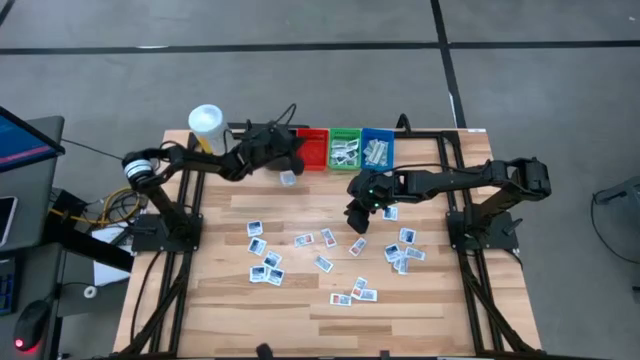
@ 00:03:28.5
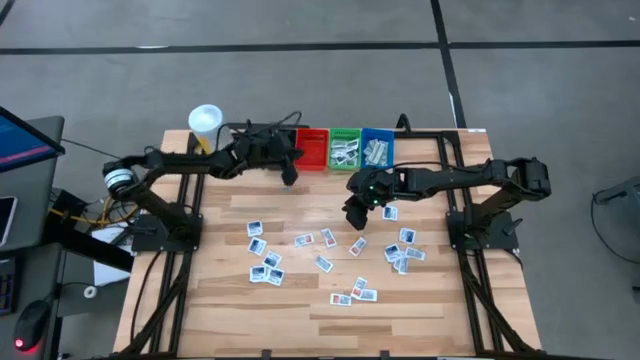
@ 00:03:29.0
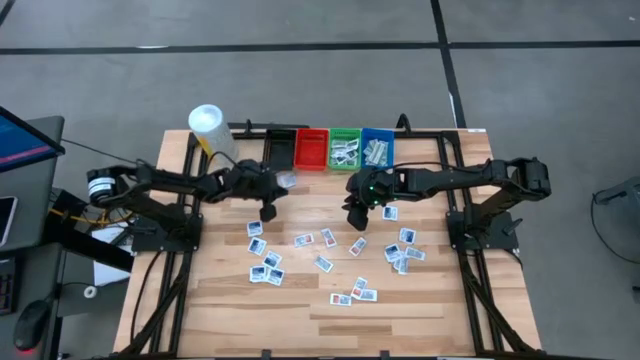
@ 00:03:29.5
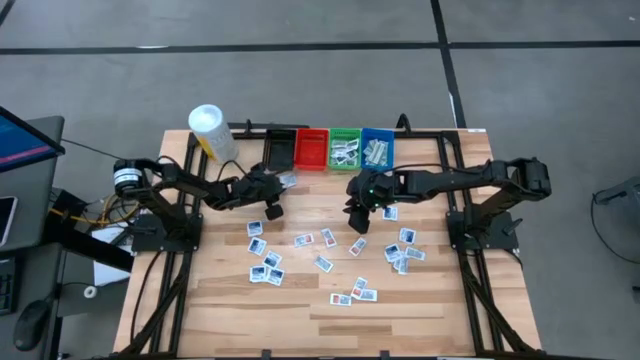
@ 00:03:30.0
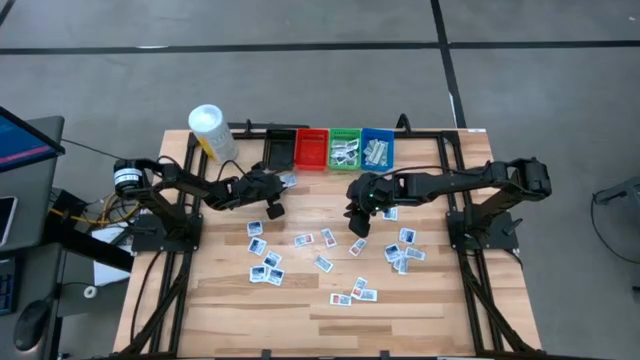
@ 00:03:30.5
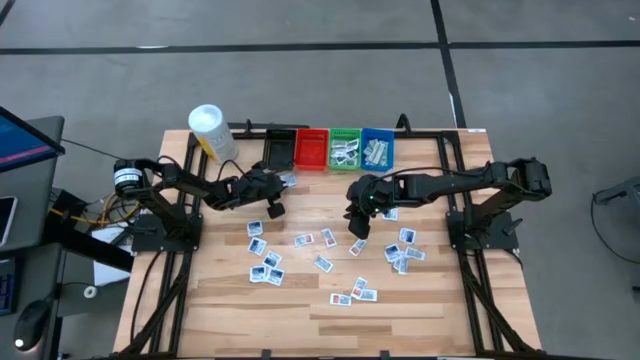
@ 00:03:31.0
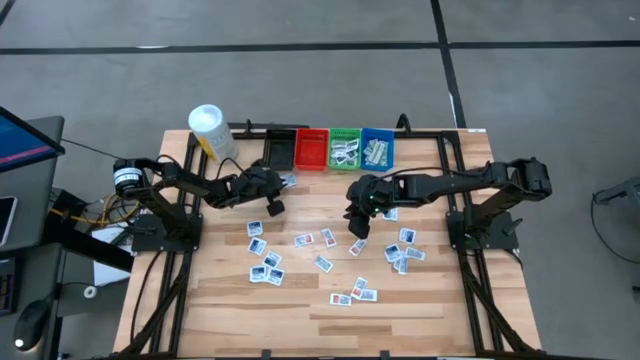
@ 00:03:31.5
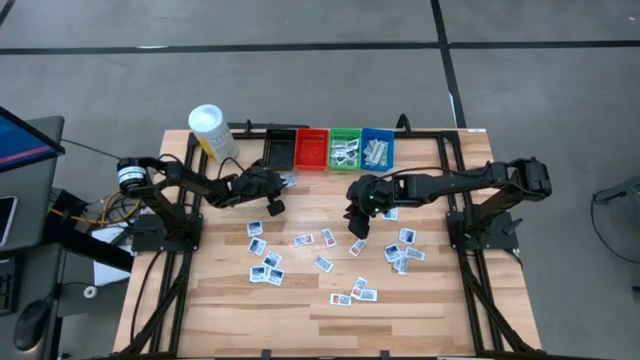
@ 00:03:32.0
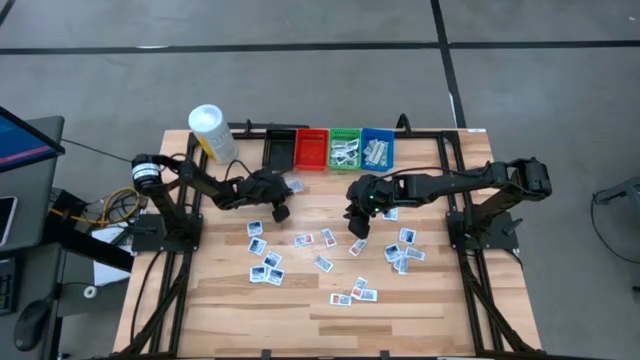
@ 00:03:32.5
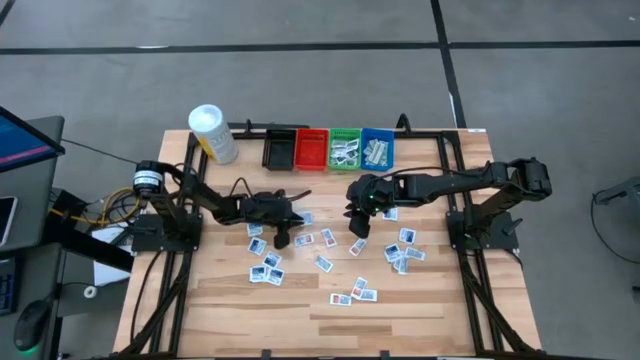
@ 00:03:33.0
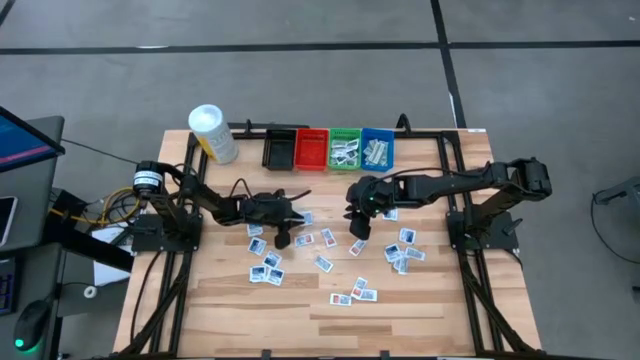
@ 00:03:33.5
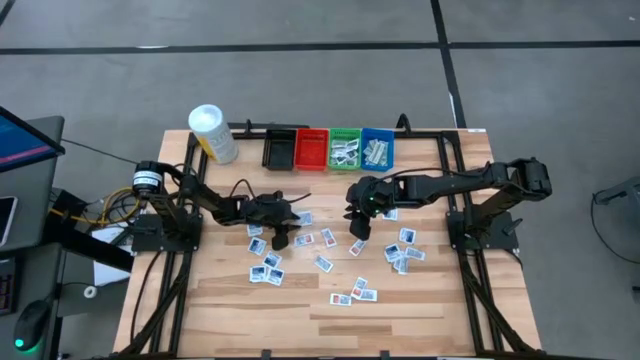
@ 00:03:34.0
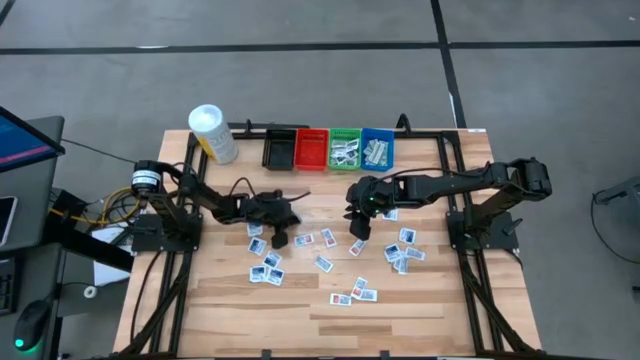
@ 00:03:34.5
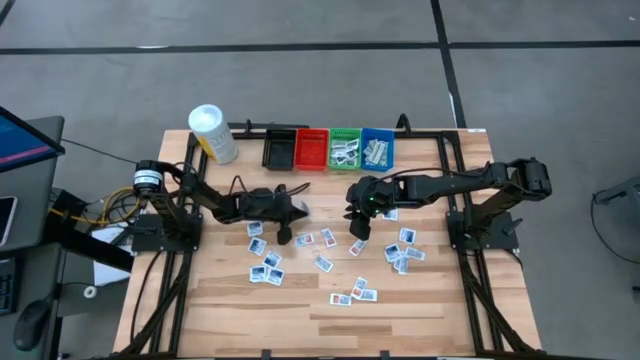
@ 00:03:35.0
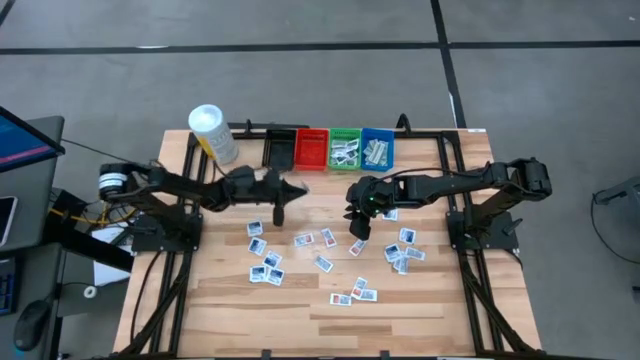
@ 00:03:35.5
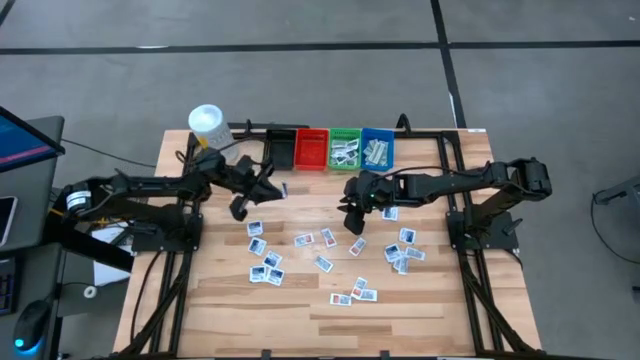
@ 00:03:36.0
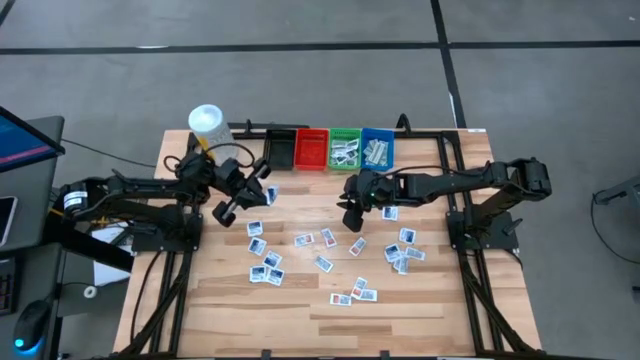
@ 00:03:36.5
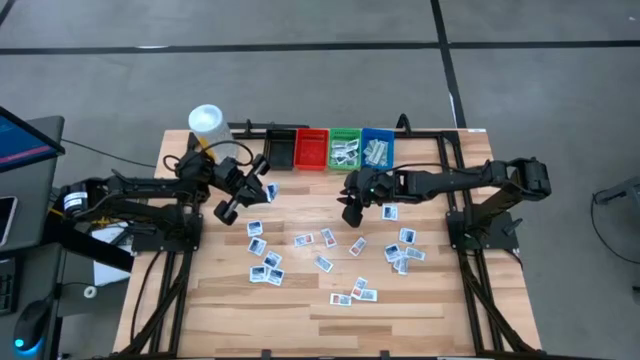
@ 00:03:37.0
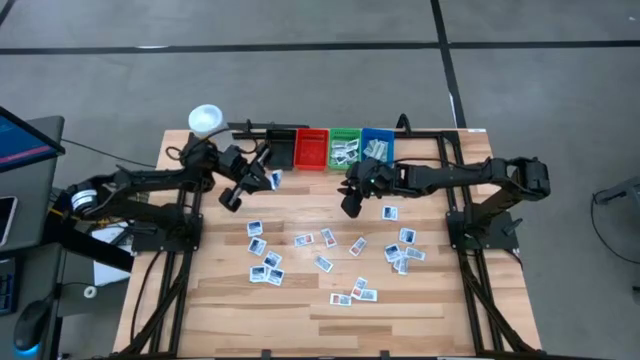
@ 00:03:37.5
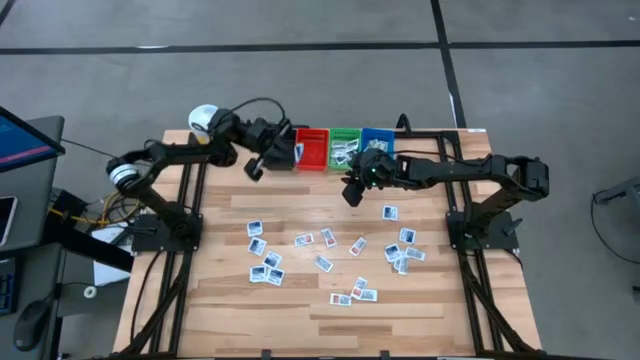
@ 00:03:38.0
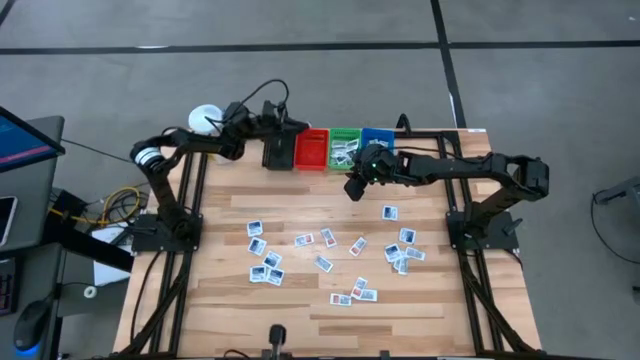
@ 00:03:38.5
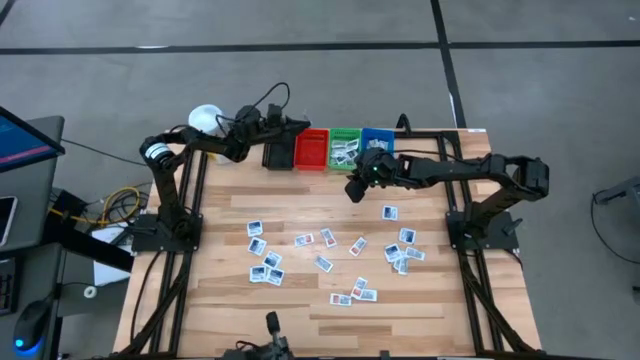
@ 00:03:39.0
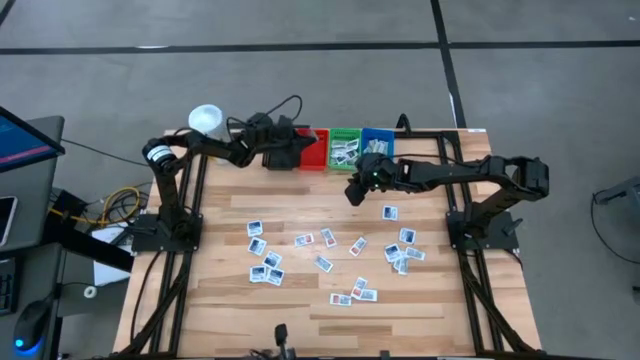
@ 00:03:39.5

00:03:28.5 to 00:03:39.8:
Task: Pick & Place First Aid Supplies
Put the alcohol pad into the red bin

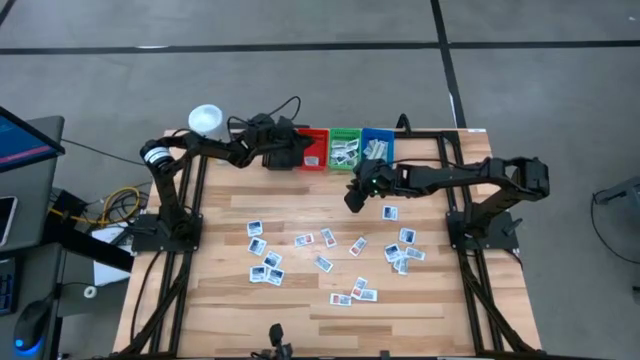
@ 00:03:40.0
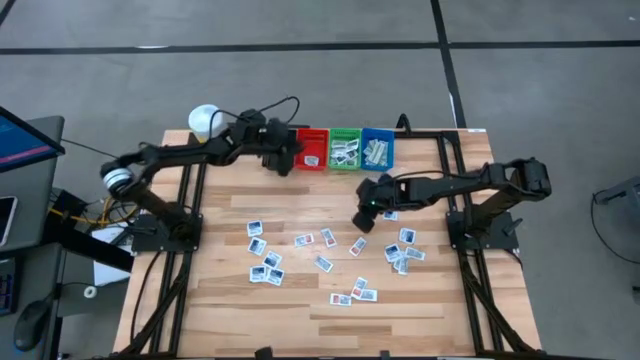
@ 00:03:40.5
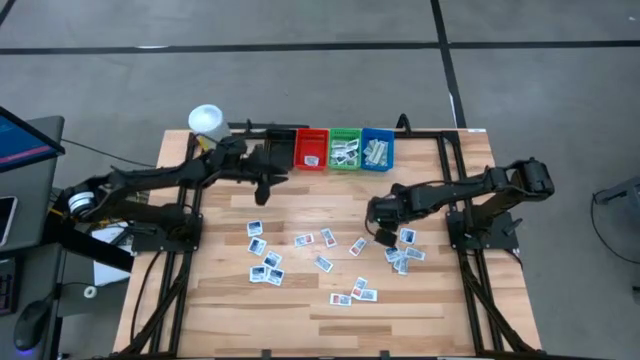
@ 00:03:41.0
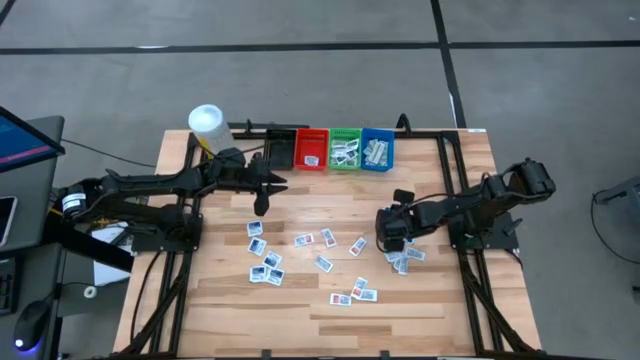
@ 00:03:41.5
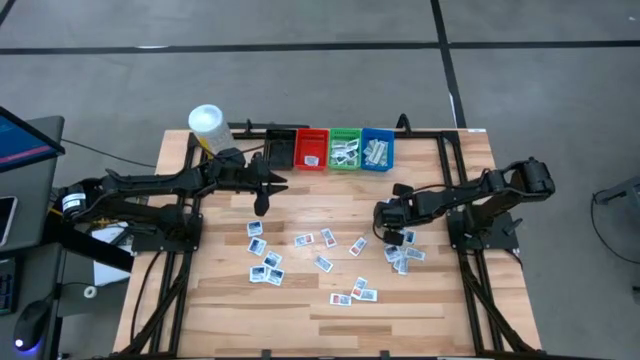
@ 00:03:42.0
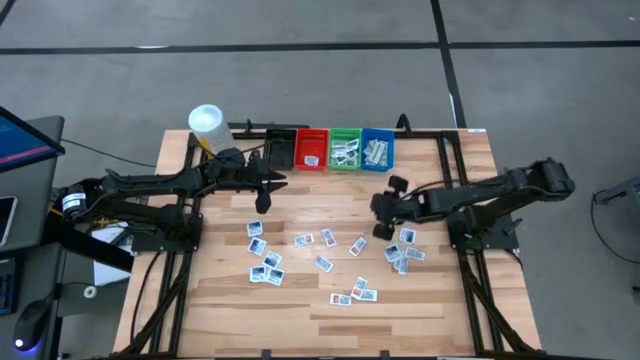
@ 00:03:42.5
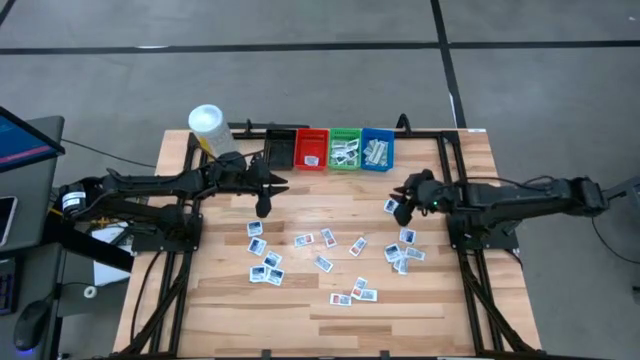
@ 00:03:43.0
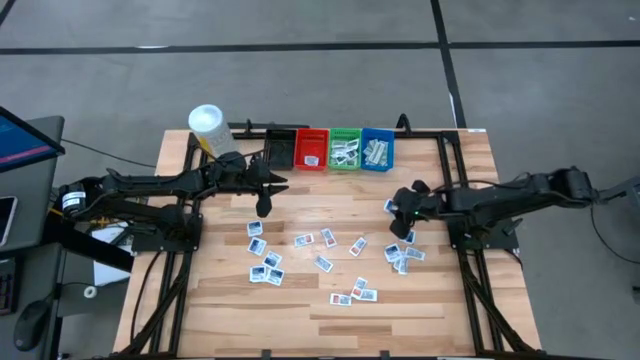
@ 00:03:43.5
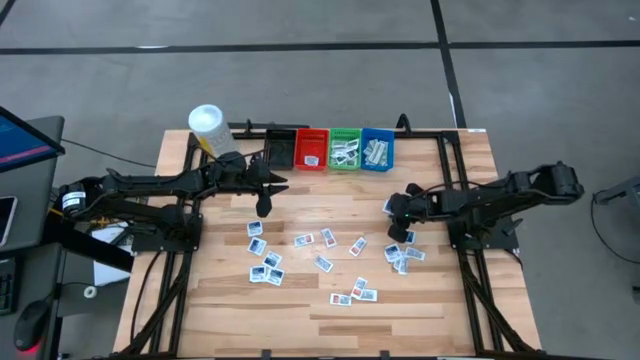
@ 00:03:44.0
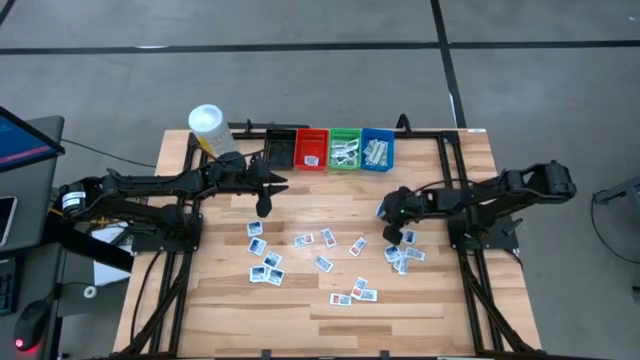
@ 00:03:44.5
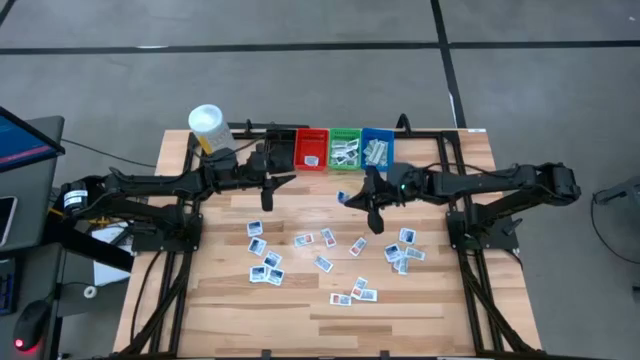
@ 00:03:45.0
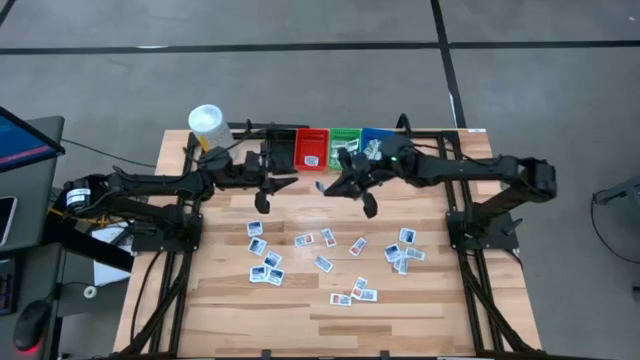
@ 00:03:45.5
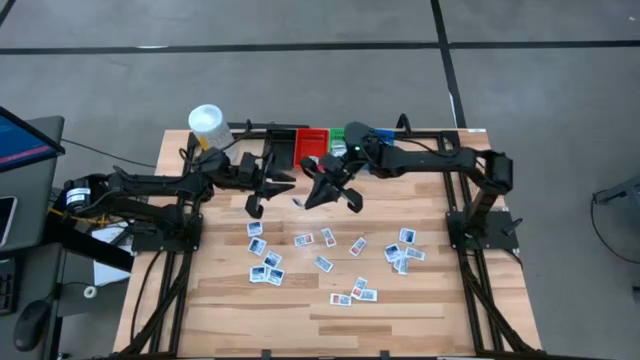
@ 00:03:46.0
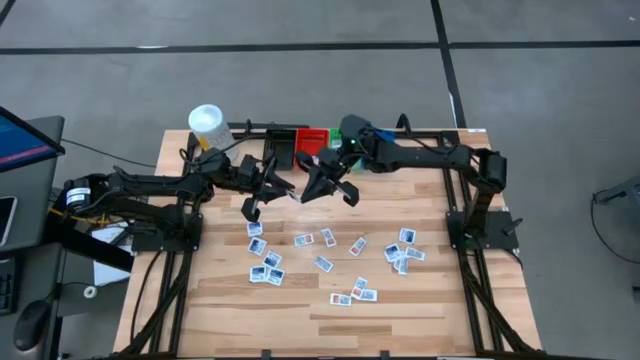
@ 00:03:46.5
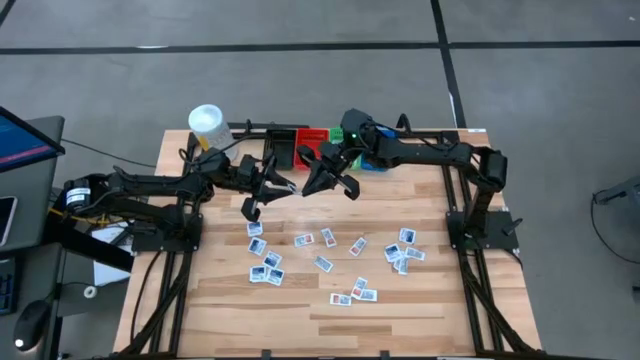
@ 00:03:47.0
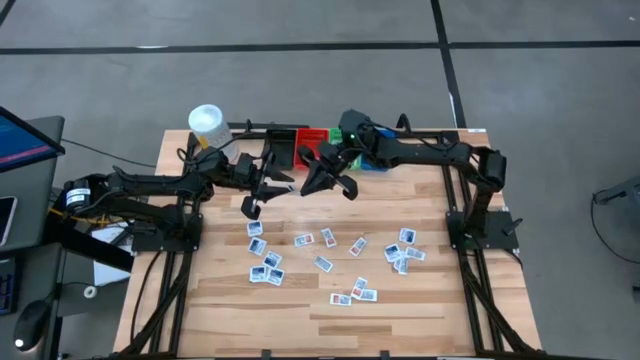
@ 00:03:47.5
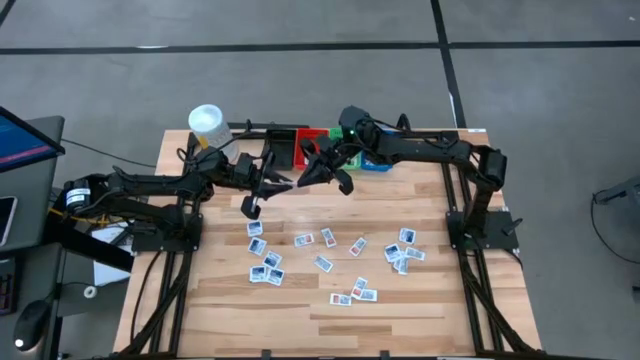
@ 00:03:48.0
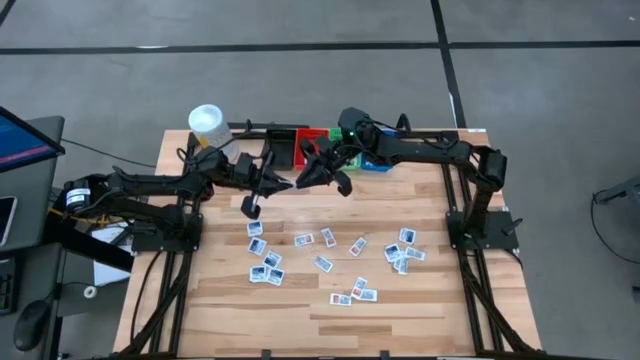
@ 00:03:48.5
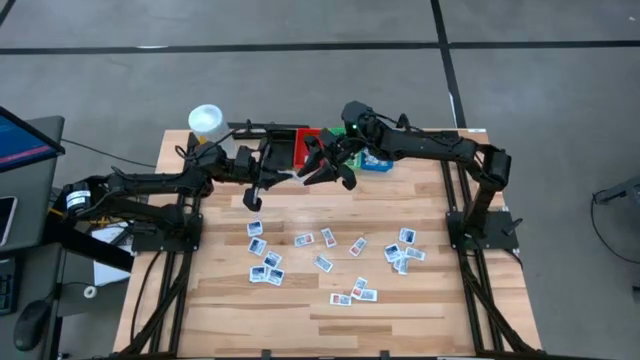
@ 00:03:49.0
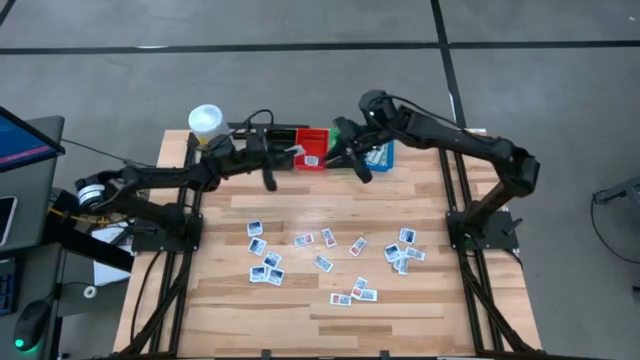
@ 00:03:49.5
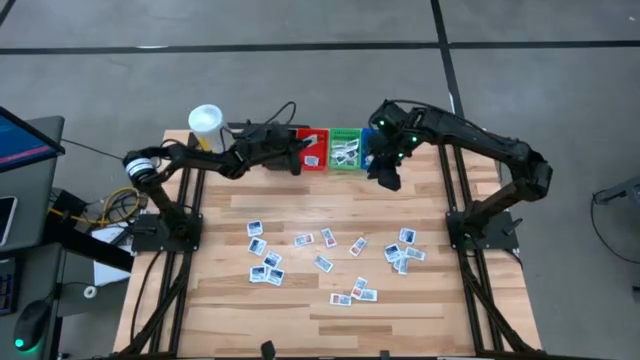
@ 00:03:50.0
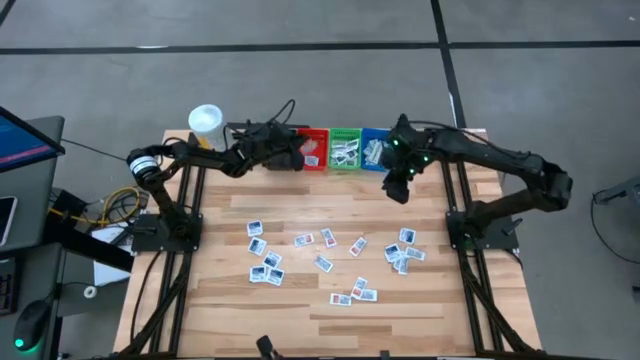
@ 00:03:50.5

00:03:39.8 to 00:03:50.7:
Put the alcohol pad into the red bin
